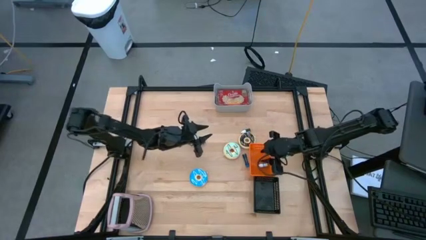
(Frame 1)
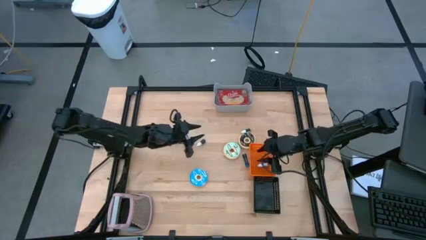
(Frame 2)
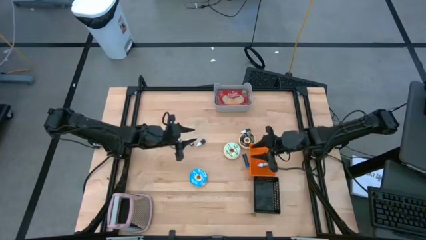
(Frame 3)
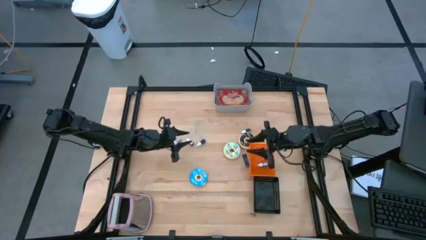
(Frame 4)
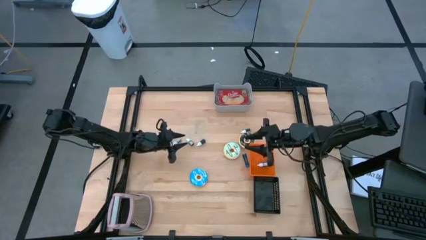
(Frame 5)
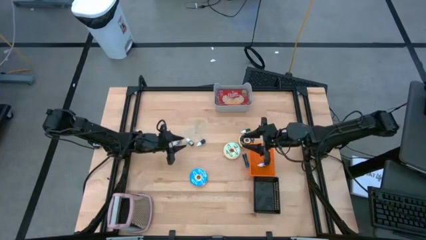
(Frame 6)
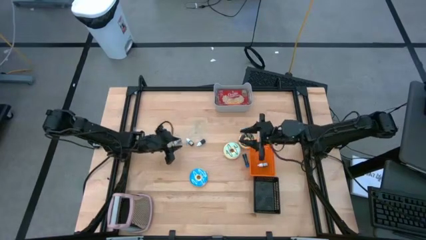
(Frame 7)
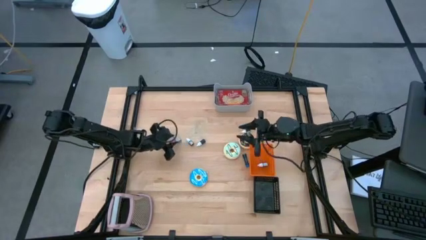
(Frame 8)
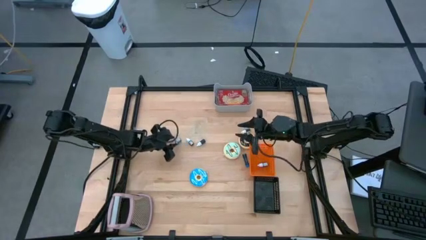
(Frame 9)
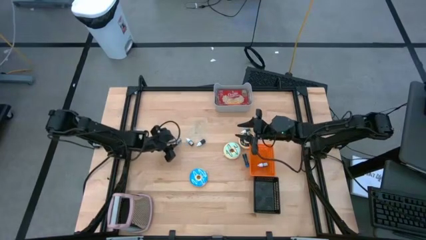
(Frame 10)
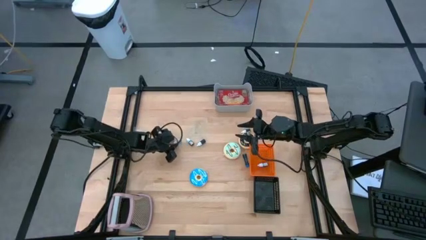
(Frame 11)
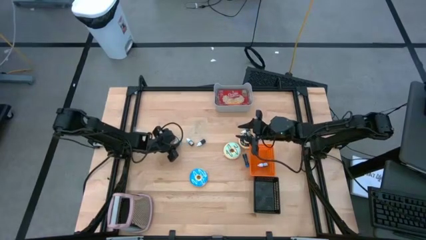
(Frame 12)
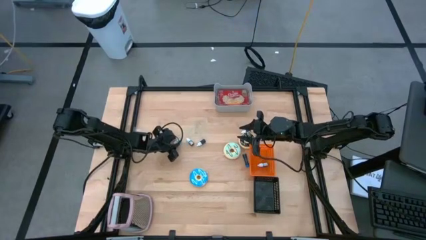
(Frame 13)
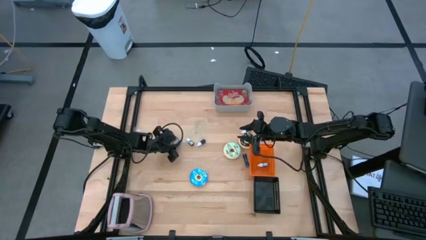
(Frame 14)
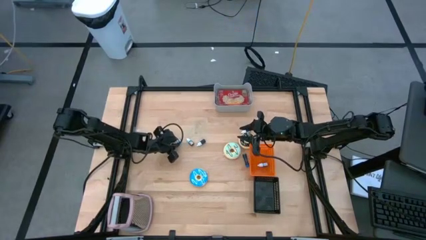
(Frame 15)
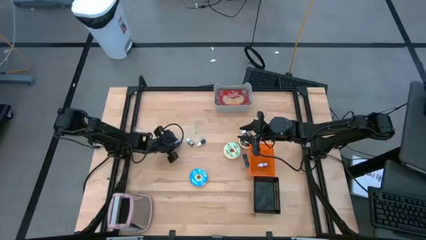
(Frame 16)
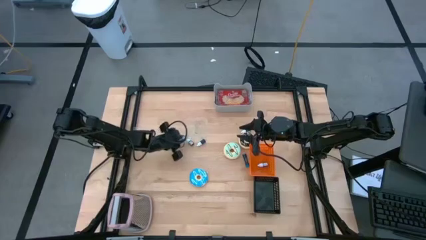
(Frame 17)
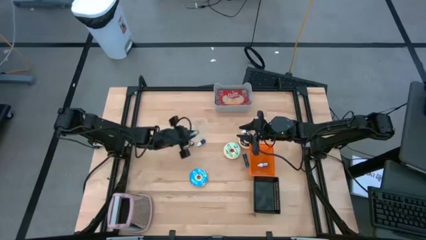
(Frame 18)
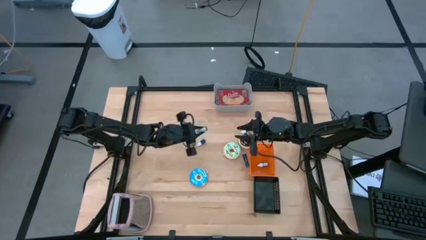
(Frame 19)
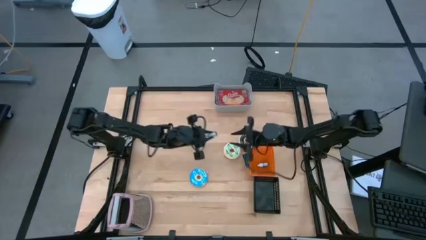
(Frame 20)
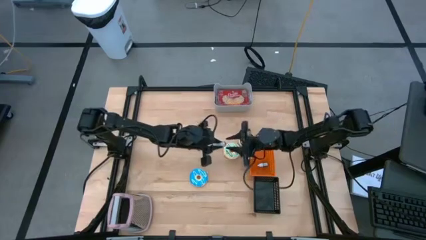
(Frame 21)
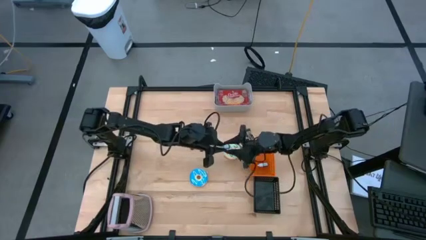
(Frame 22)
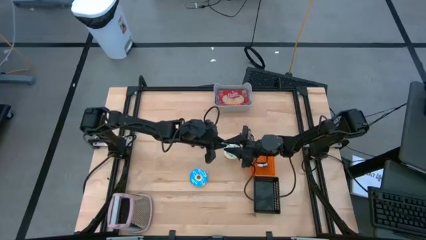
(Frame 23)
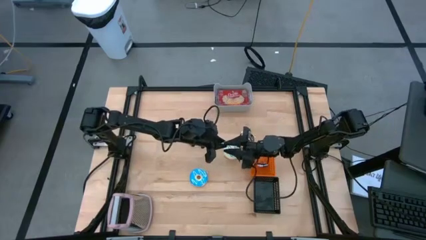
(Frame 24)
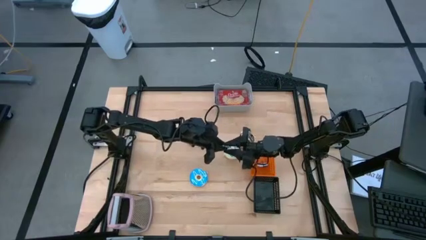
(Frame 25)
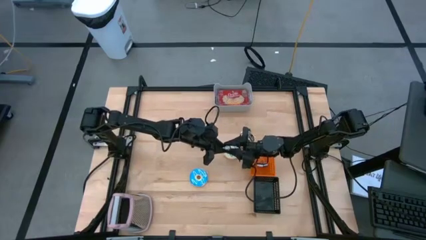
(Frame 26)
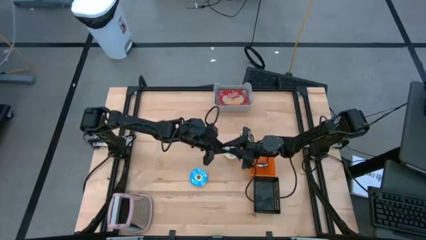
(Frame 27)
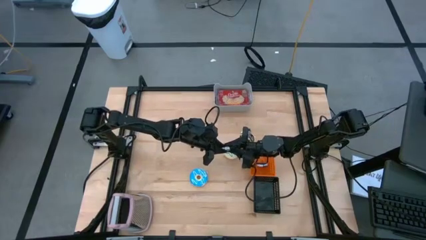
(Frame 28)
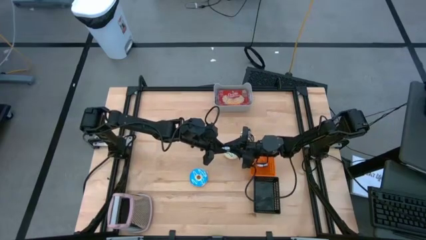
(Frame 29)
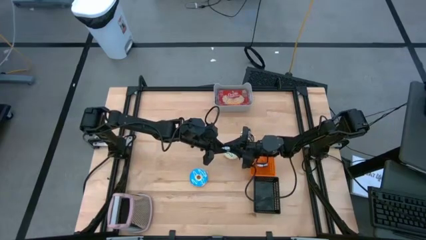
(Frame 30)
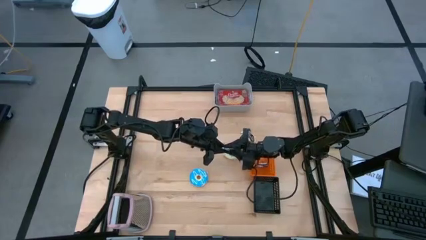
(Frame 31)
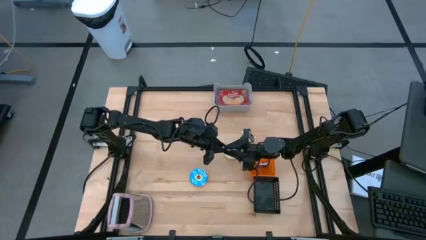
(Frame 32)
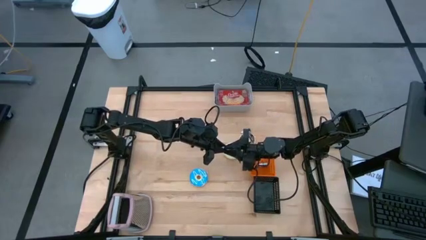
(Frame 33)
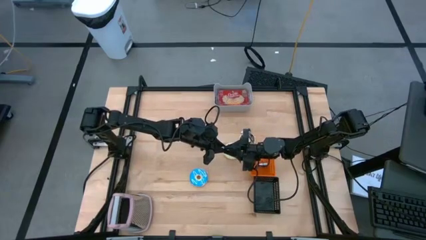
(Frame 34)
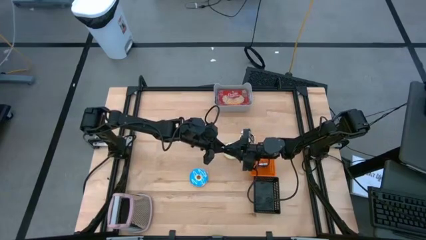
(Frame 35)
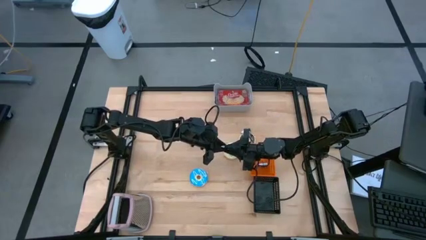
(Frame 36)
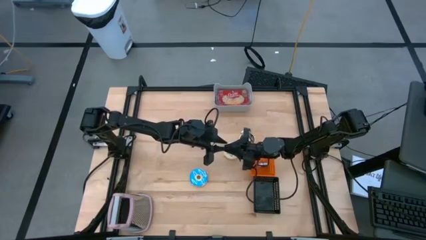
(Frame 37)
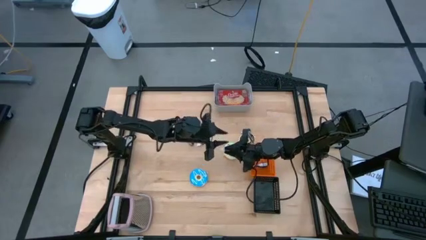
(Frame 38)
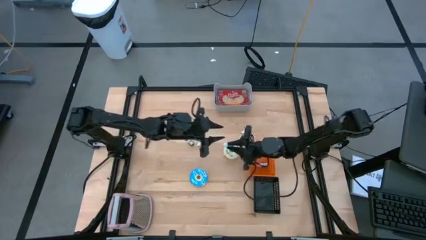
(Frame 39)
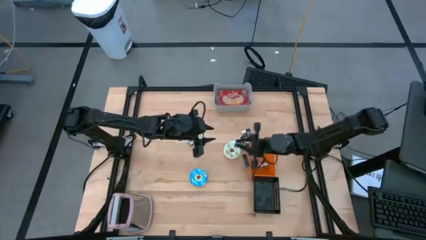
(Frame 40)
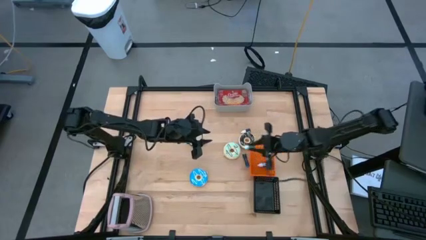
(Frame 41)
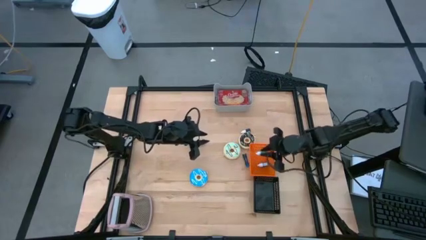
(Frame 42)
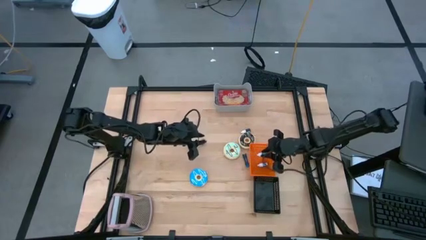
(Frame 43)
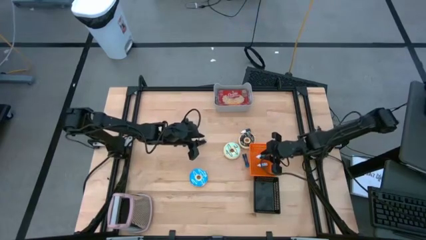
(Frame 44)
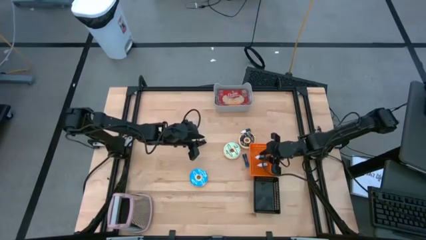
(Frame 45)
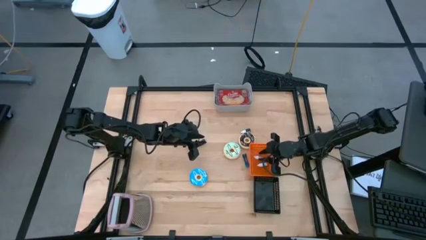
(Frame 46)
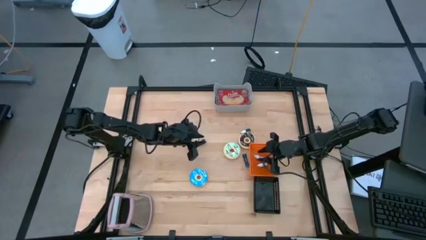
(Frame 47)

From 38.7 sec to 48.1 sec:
Put the green food coloring bottle into the orange bin

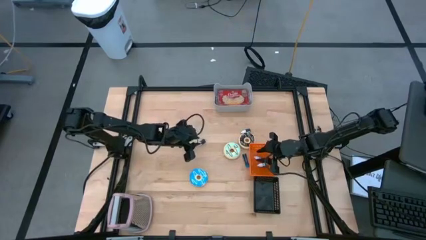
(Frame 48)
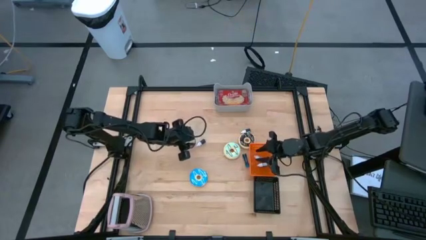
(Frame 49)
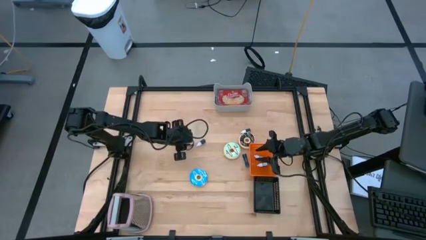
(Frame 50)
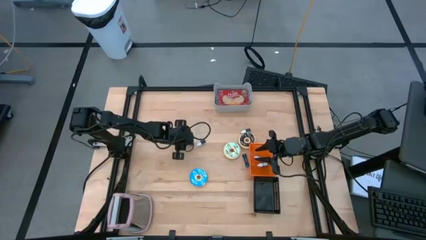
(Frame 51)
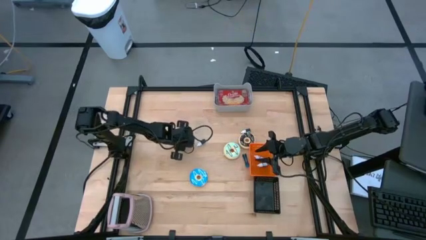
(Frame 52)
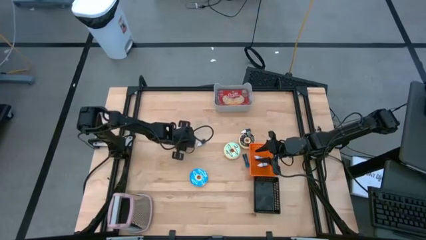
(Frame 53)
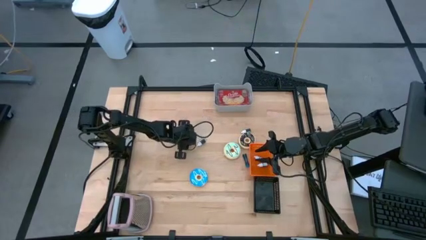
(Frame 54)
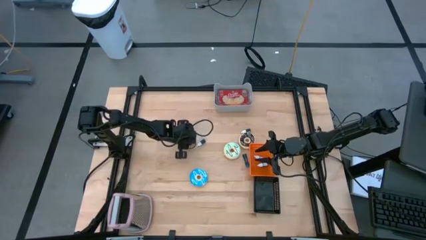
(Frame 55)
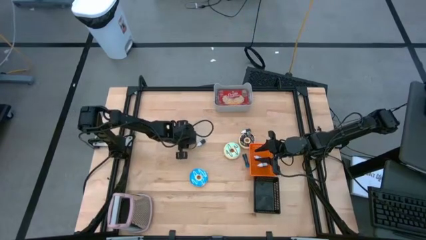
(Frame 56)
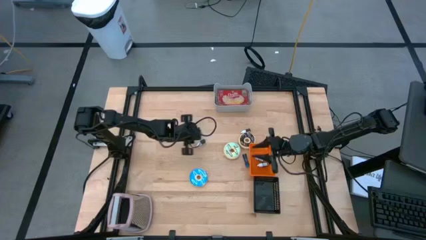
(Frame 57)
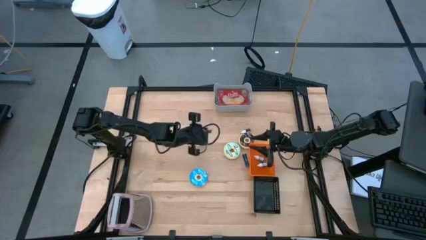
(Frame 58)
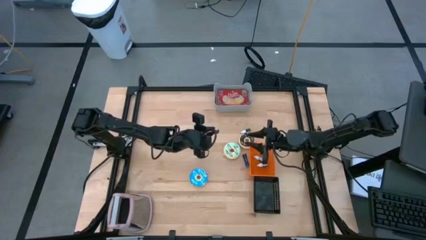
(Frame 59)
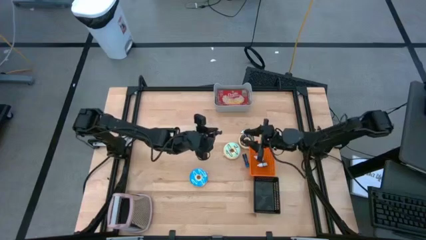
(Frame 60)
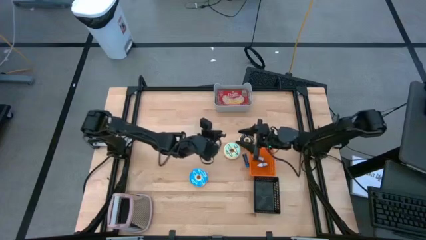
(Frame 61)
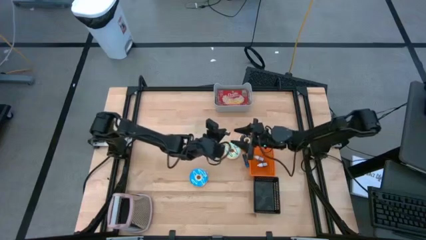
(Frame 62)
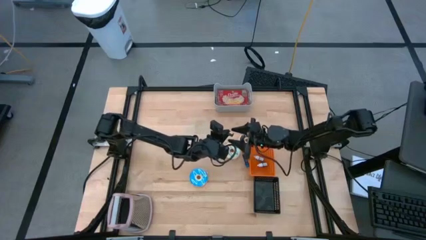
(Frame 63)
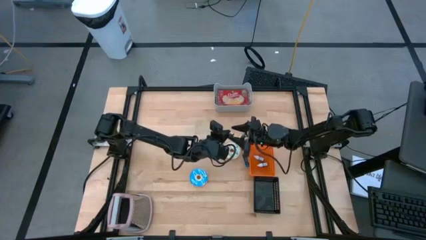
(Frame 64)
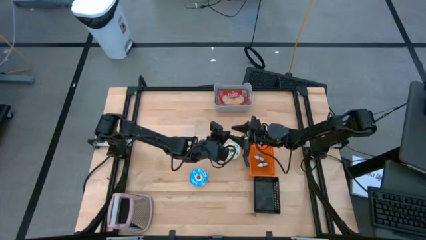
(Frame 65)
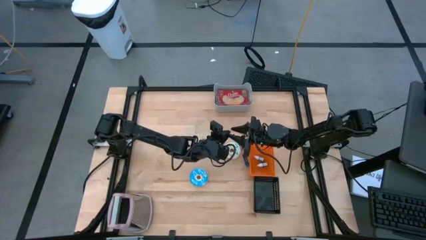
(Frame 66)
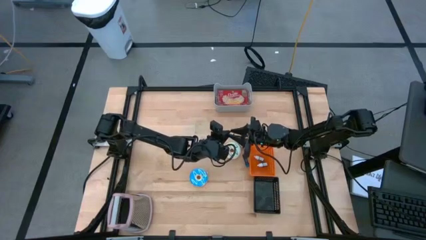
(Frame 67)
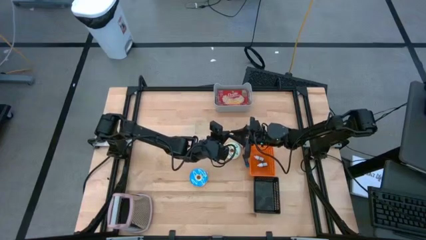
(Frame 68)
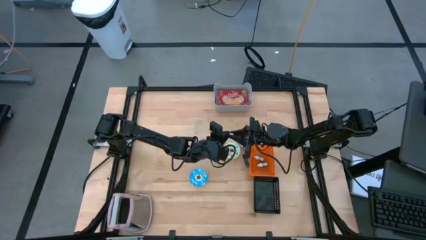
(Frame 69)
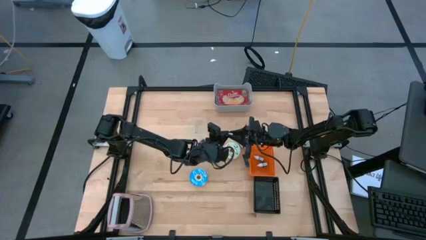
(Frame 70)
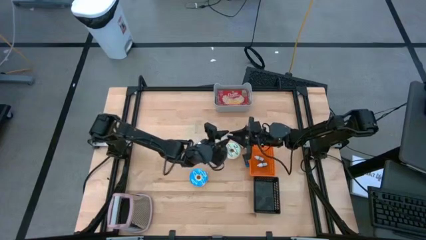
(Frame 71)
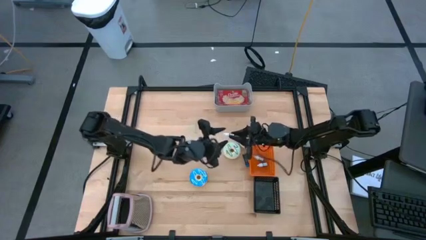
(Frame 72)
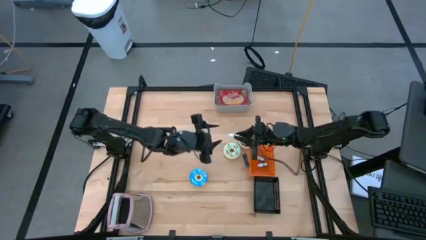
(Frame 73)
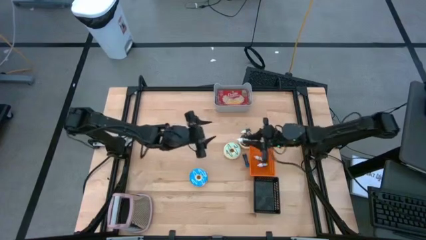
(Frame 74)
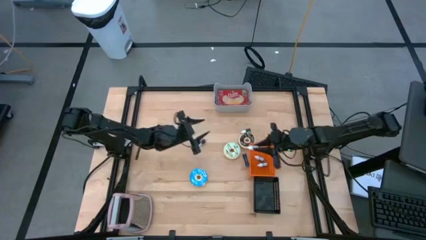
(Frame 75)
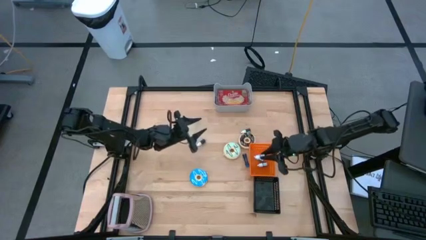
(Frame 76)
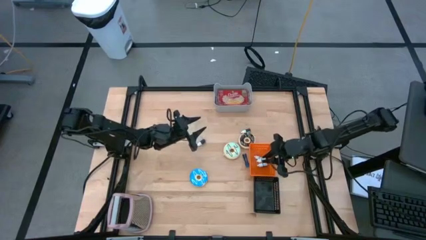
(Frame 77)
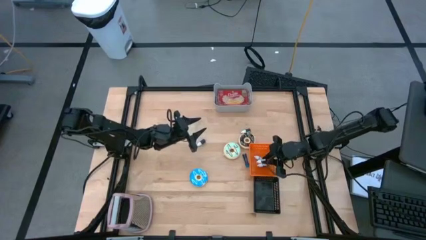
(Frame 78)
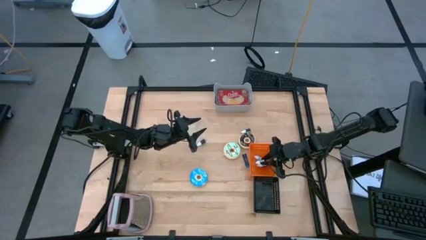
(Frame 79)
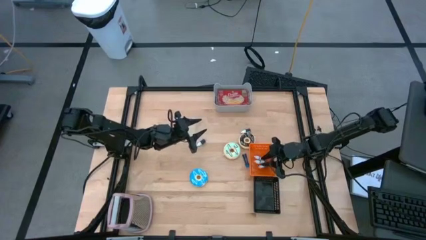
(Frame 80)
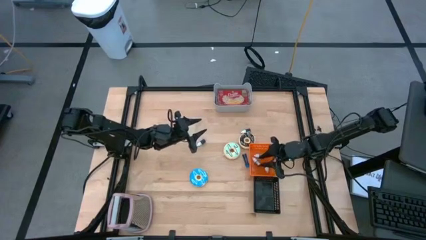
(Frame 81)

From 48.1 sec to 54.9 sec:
Put the brown food coloring bottle into the orange bin
